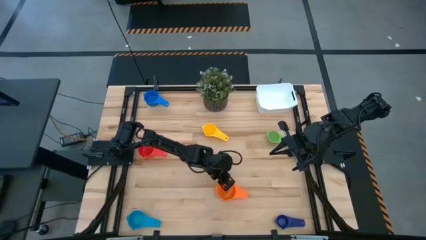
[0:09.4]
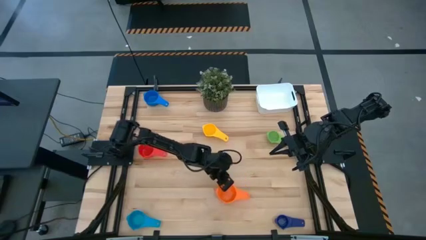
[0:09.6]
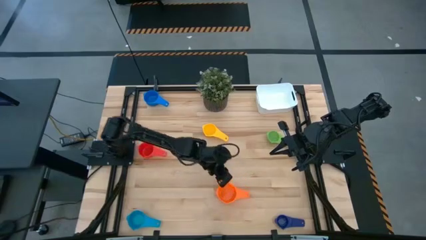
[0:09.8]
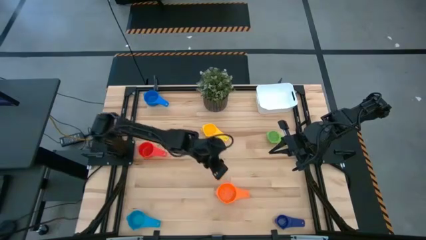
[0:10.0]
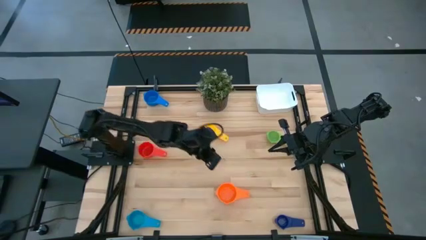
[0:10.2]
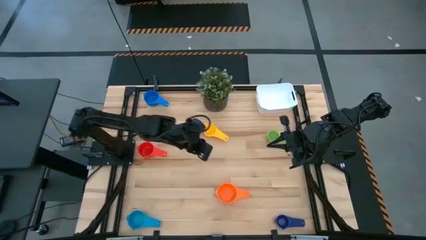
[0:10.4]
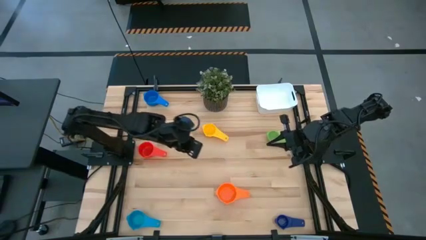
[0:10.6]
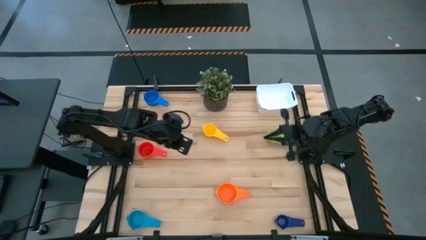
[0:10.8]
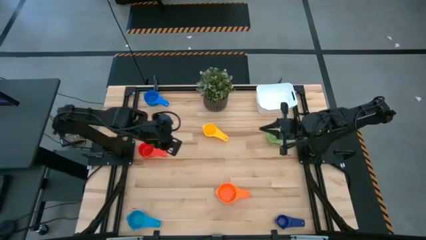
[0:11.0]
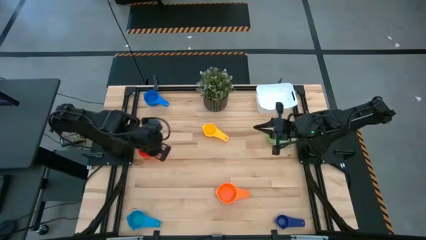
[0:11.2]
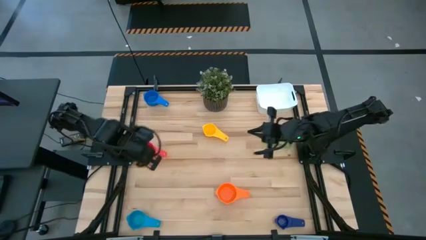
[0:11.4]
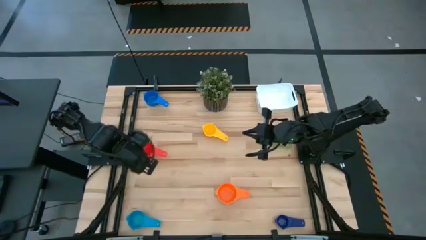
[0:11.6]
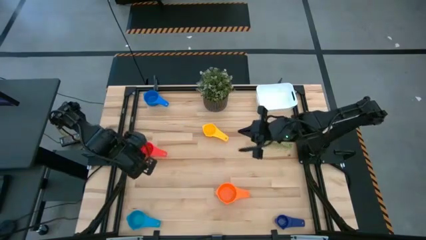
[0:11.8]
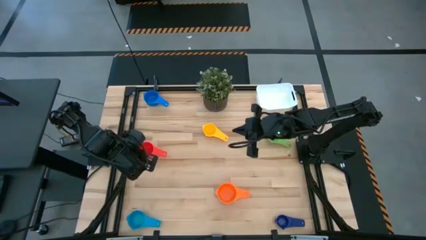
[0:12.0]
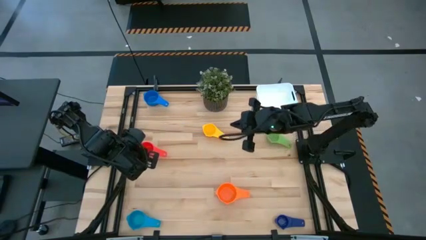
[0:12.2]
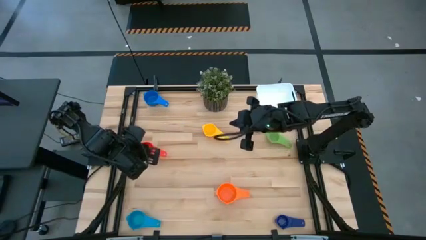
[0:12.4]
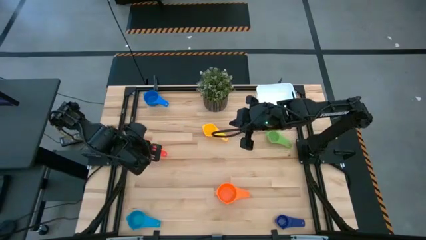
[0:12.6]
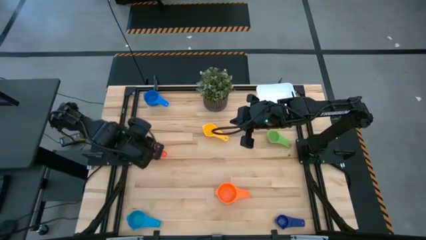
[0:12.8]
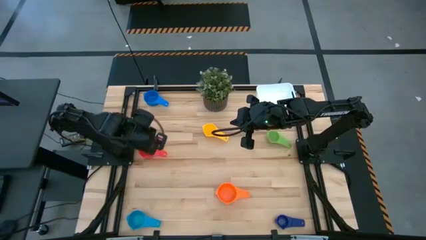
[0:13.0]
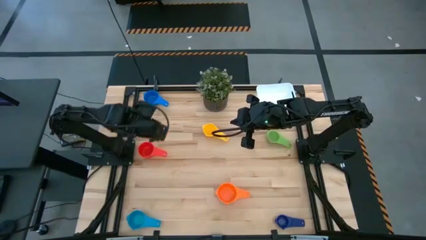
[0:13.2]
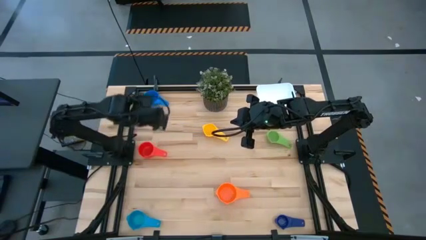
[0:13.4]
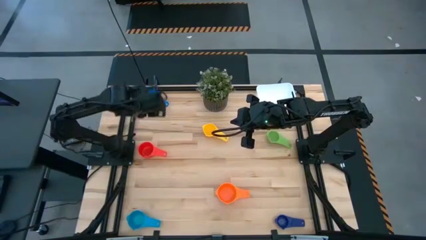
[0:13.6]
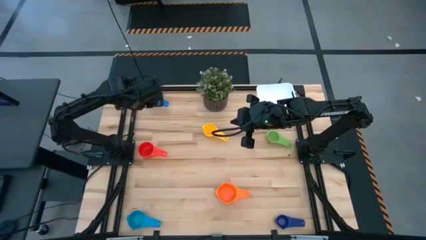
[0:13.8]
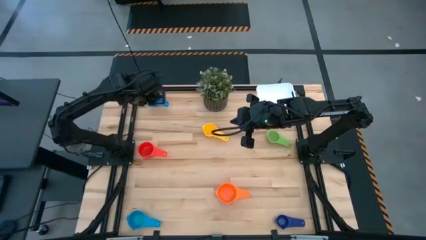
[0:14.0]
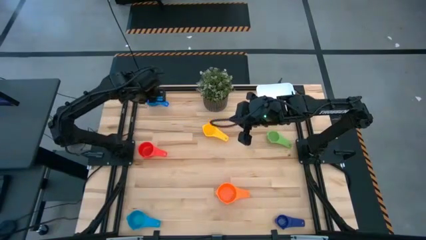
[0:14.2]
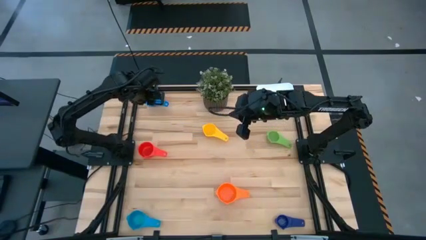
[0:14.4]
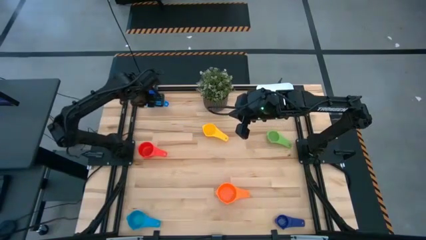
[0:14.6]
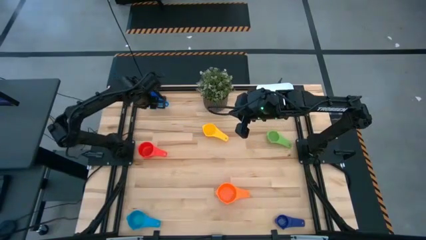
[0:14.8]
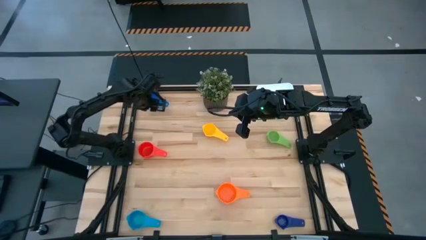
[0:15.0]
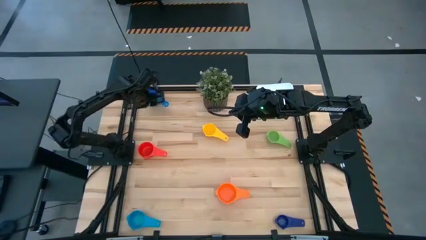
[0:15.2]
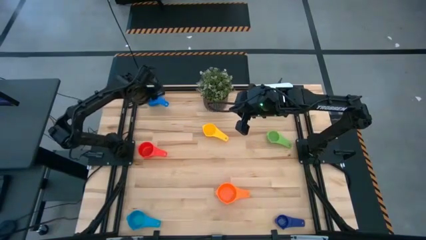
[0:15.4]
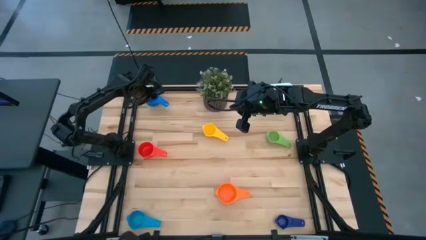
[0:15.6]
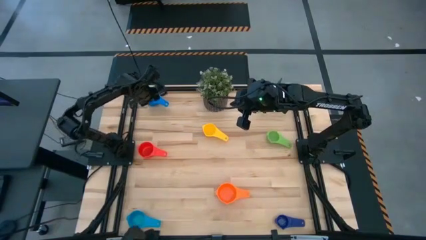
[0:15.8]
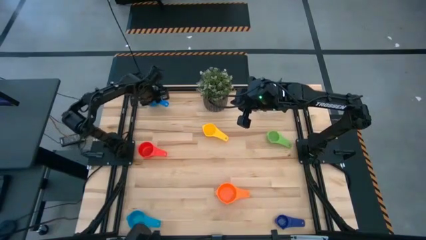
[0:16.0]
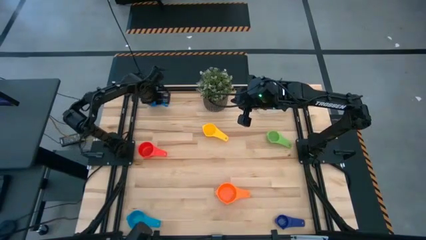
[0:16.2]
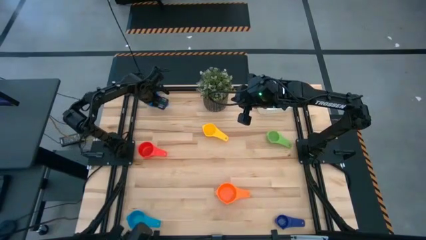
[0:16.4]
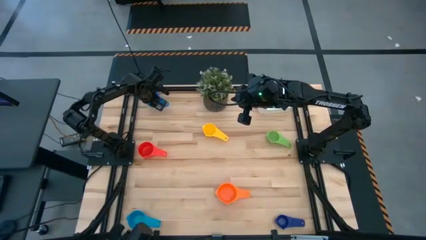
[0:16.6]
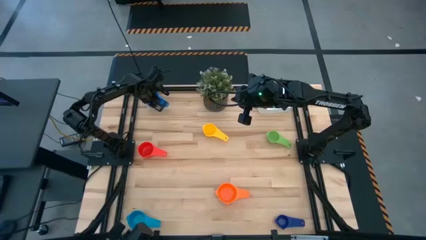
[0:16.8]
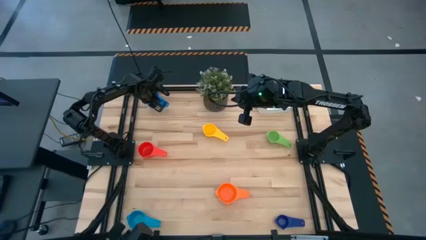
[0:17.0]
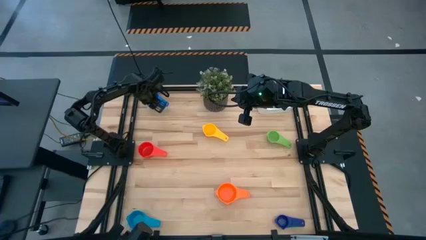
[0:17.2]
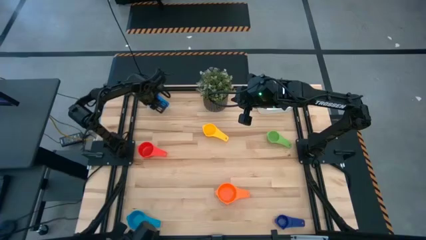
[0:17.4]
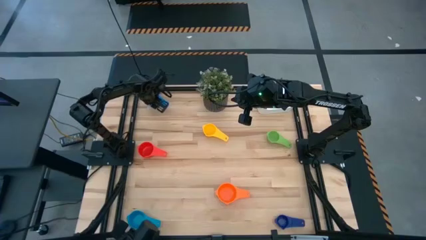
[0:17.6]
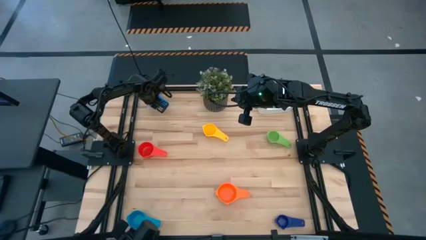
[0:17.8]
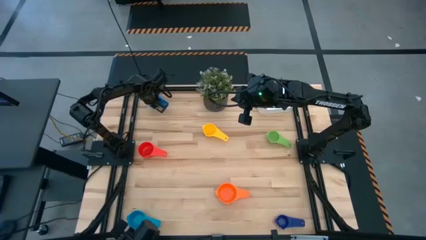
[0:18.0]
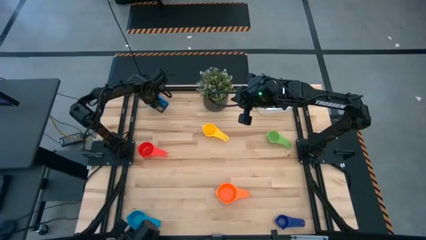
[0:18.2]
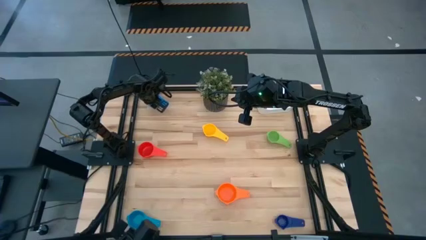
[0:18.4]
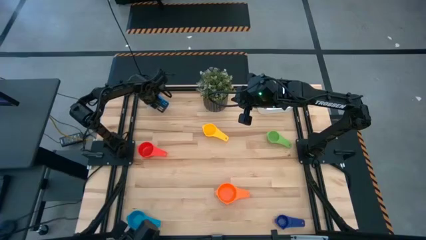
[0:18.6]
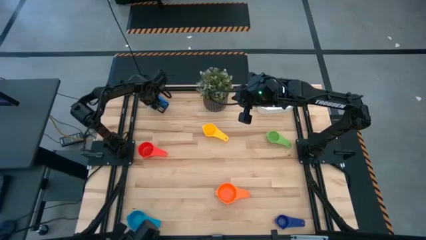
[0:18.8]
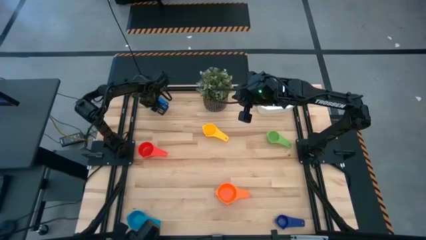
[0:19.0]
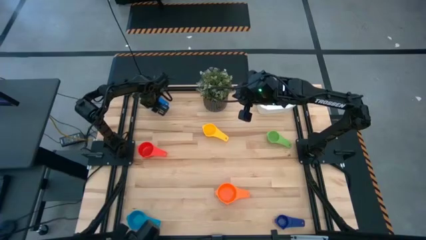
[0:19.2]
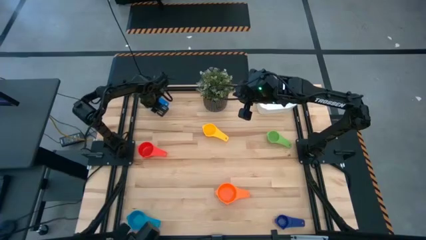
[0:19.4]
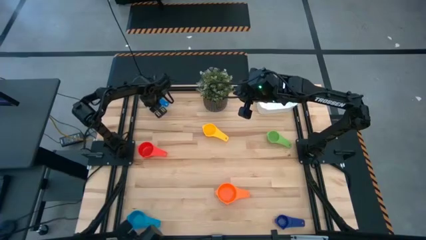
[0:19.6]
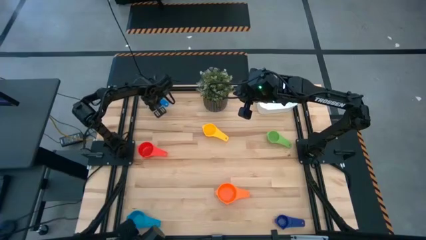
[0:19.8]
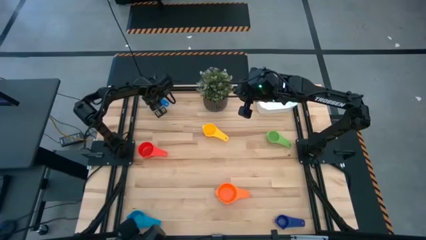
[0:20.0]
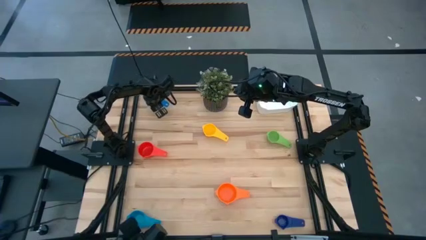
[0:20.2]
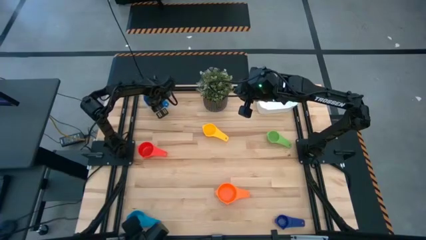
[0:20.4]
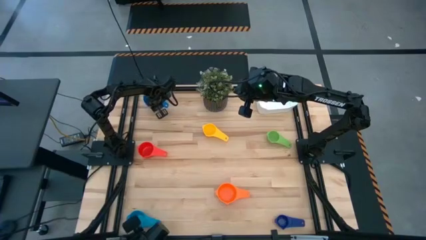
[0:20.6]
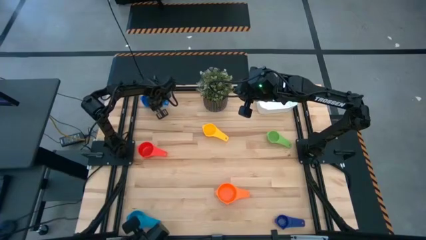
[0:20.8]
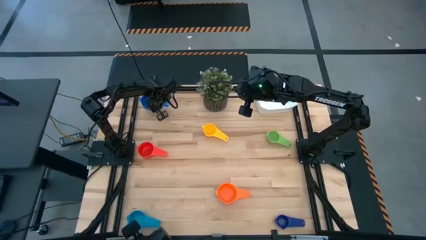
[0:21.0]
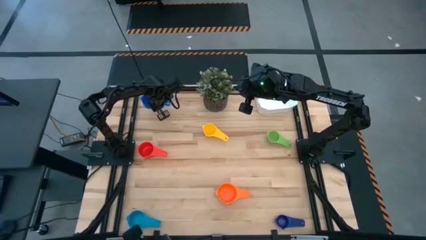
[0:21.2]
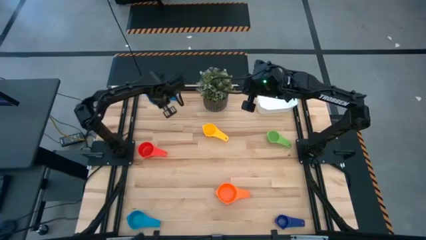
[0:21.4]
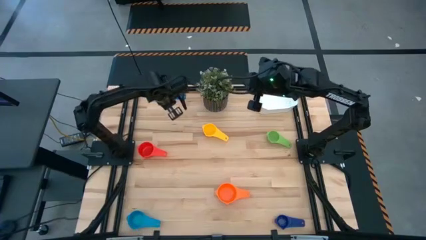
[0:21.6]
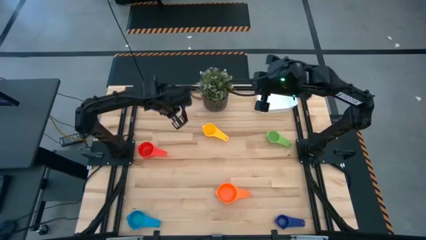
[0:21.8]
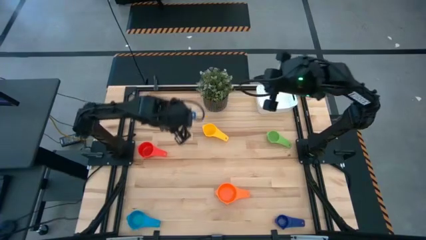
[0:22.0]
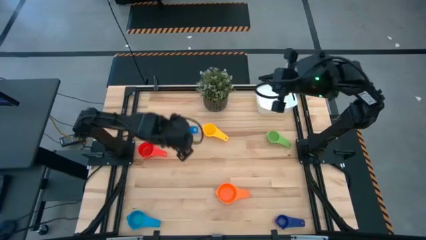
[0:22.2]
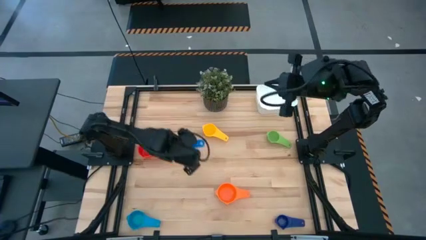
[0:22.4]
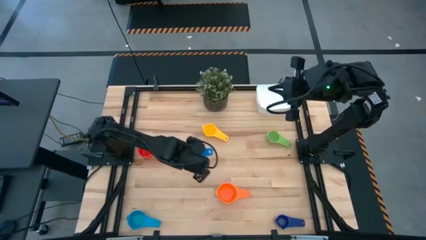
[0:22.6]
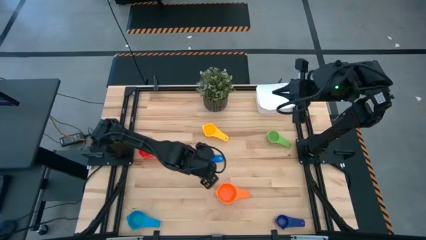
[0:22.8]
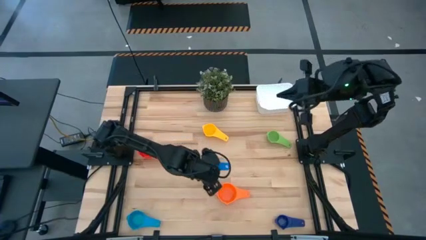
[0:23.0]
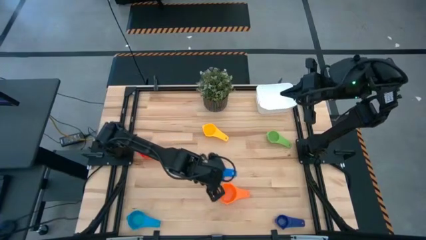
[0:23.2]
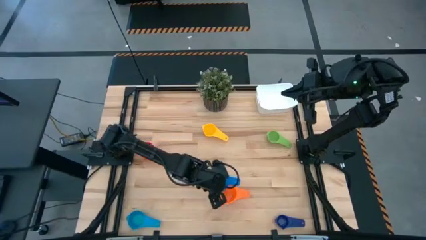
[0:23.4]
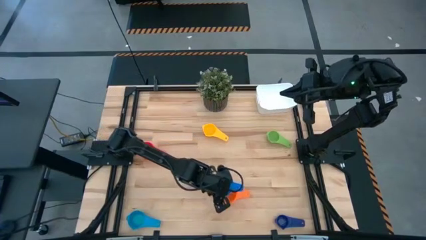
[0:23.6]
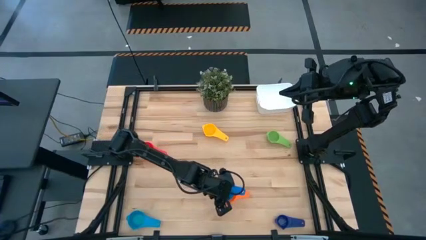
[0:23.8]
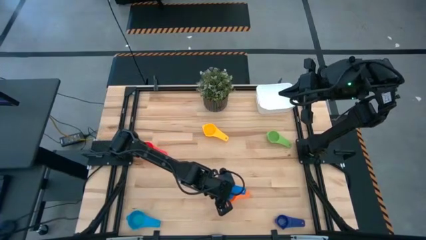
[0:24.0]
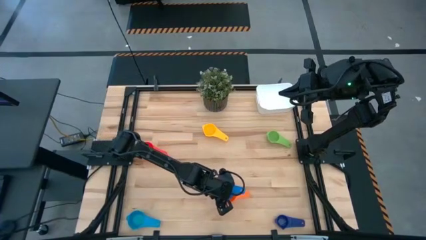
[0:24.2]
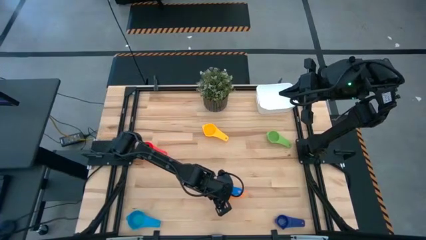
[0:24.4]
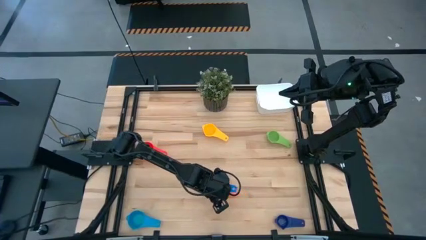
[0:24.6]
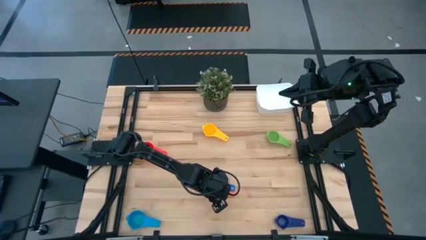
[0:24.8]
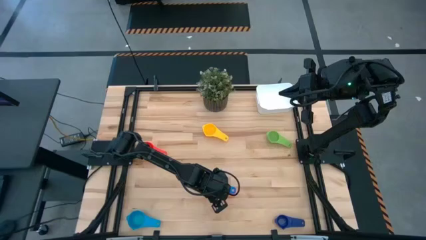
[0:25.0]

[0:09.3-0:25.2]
Task: Nest measuring cups in basket
Stack the blue measuring cup on top of the orange measuring cup
